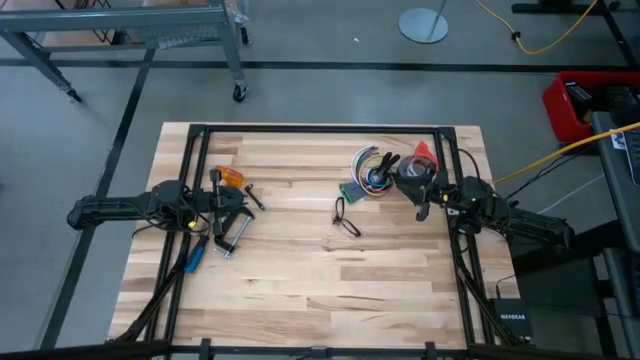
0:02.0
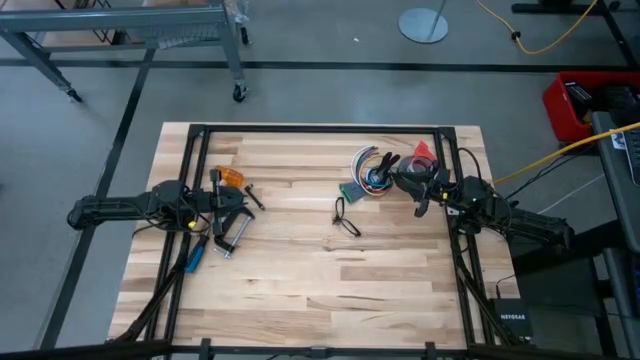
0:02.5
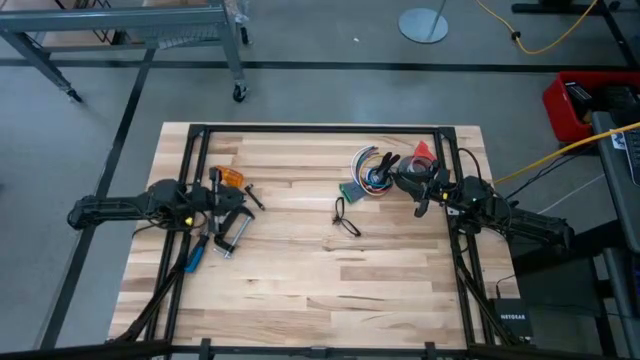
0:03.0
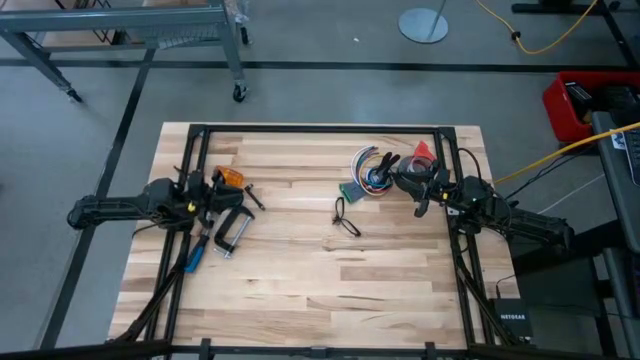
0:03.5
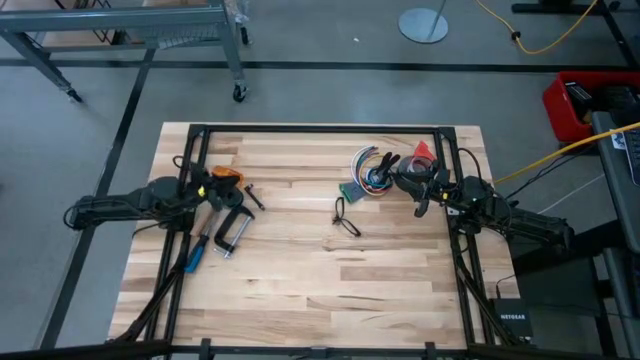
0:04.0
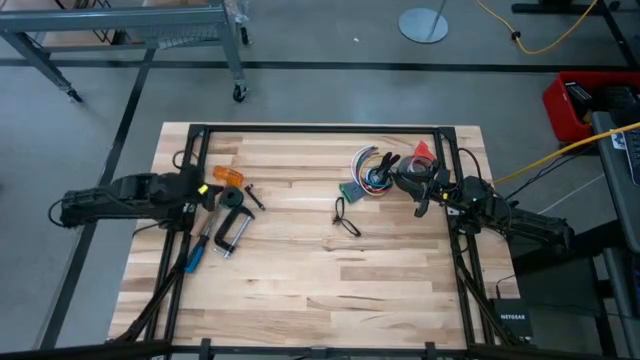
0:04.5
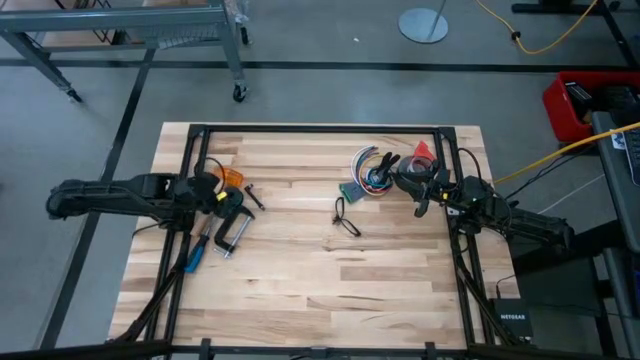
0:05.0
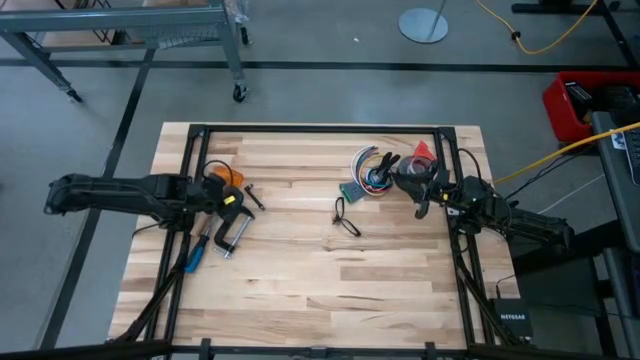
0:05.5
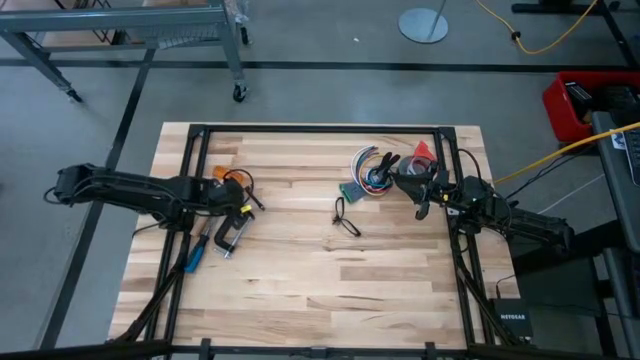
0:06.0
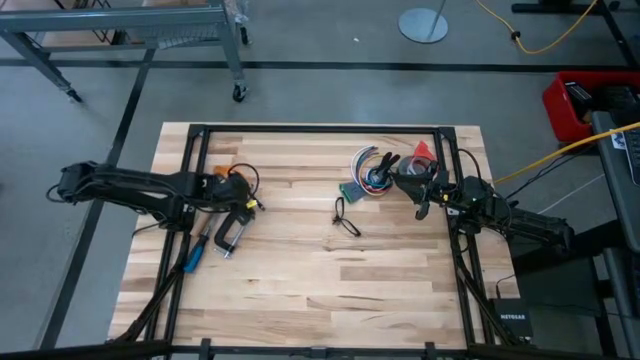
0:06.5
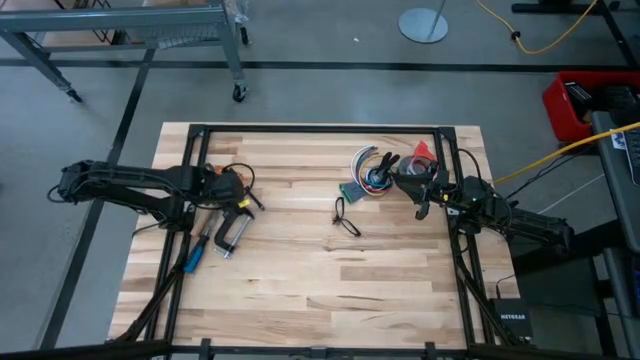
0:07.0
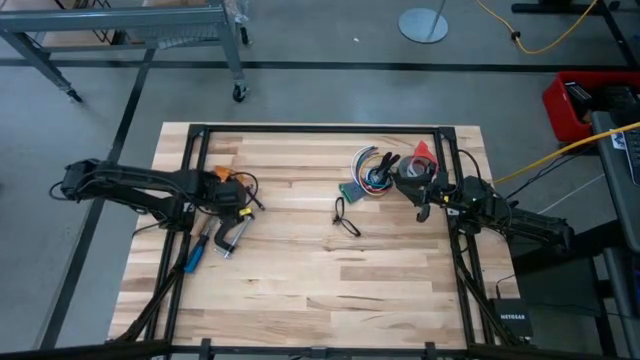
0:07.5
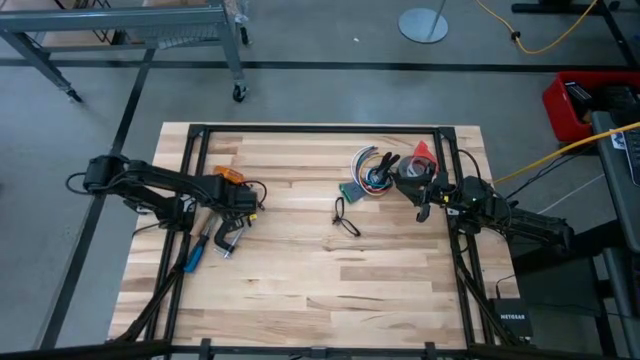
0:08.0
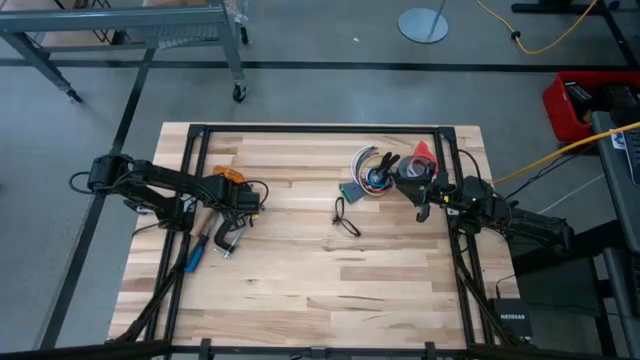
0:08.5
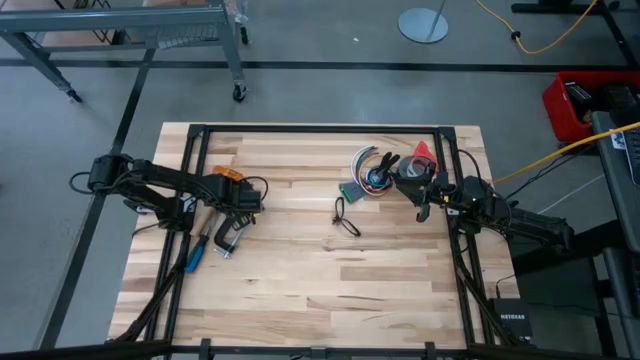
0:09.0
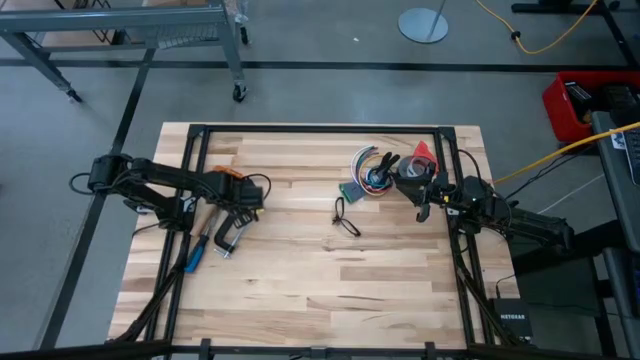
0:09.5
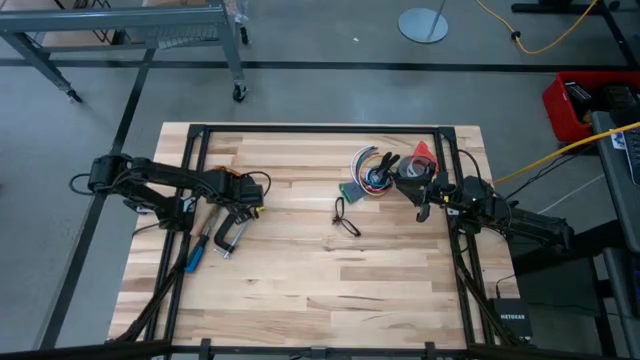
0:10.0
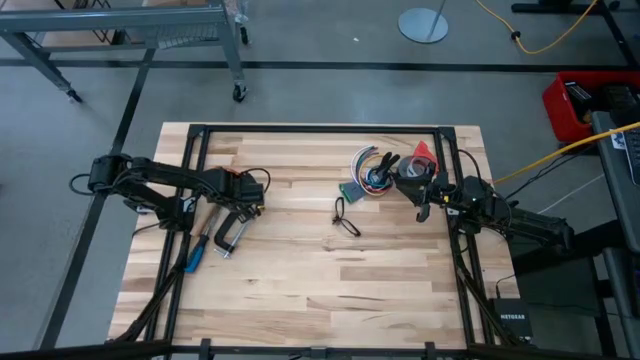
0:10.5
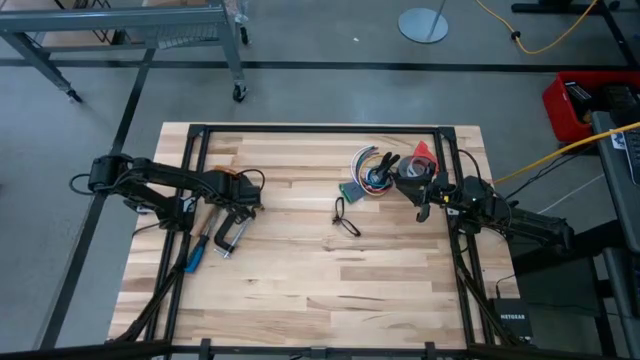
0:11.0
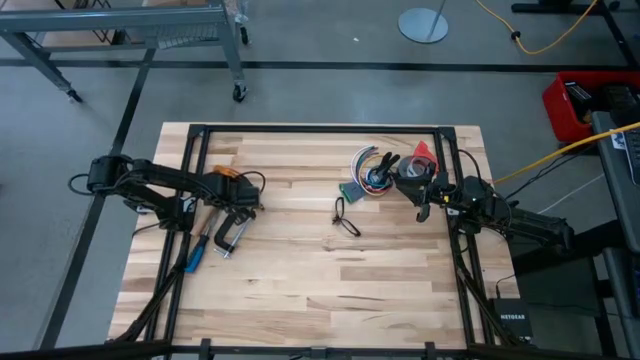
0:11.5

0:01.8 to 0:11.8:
Task: Coil cords
Uncoil the green wire from the black spool

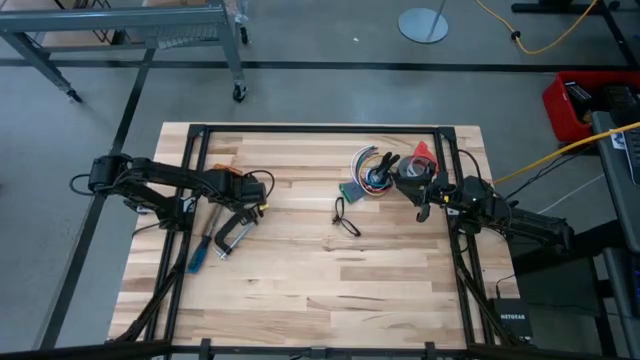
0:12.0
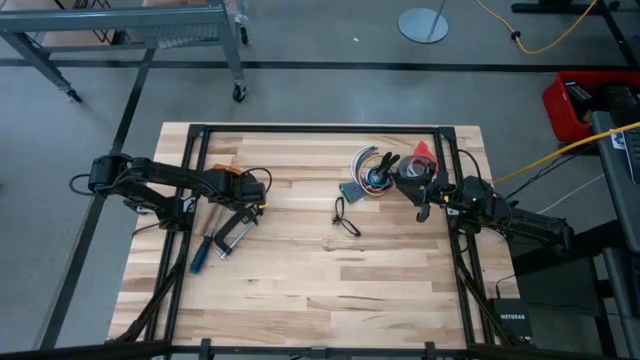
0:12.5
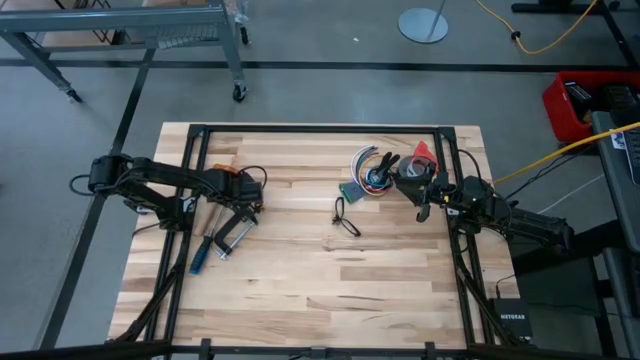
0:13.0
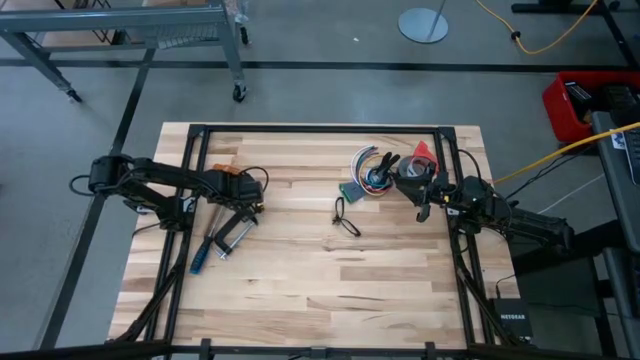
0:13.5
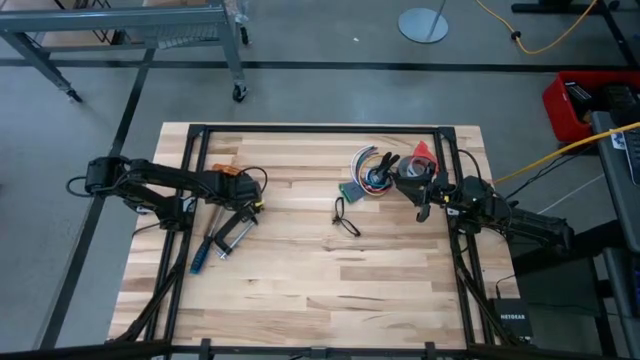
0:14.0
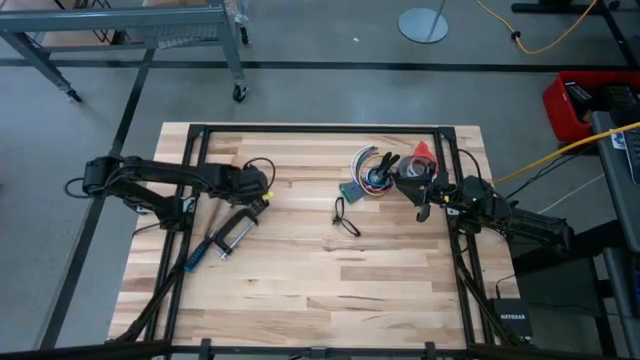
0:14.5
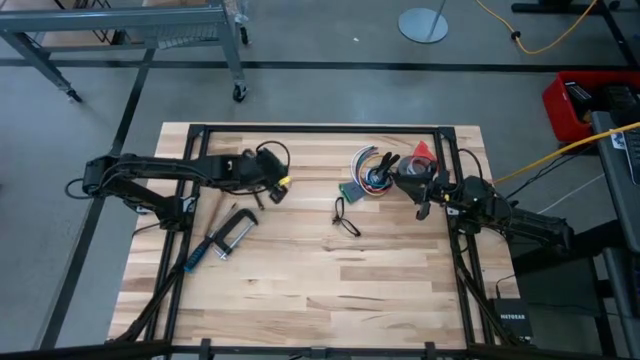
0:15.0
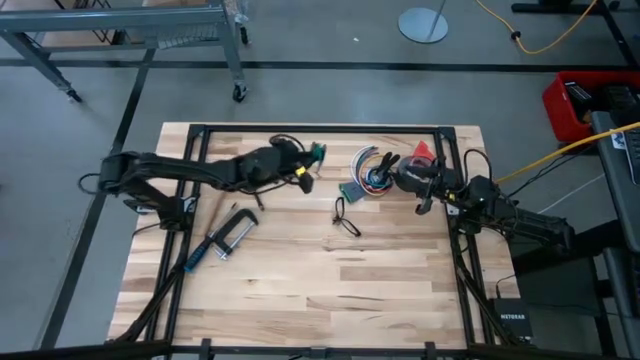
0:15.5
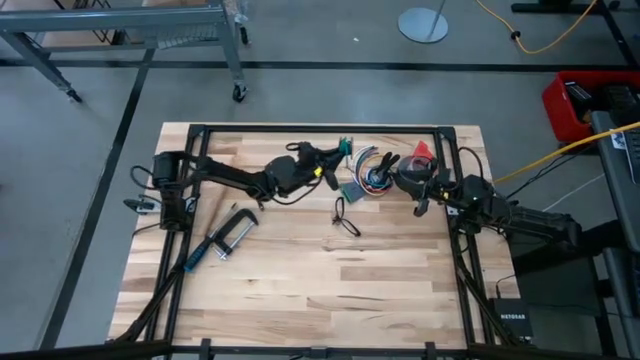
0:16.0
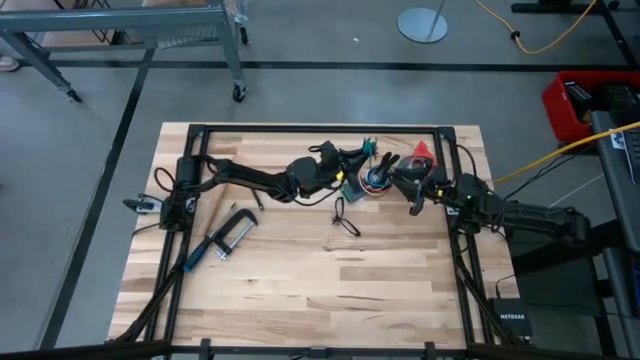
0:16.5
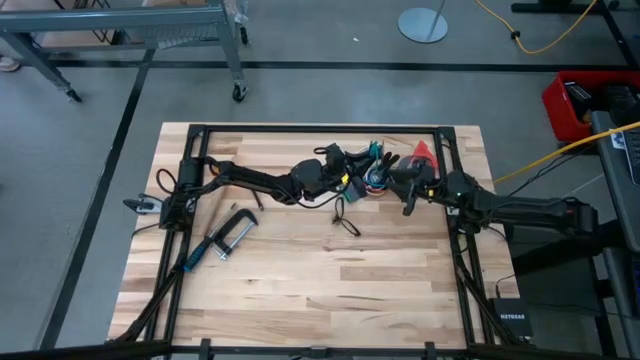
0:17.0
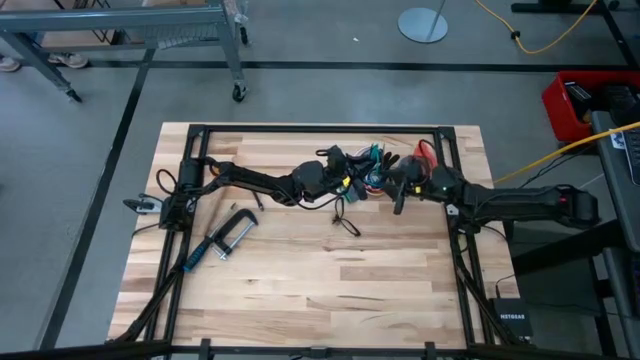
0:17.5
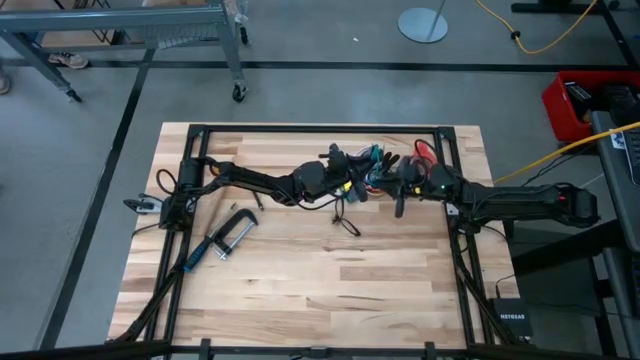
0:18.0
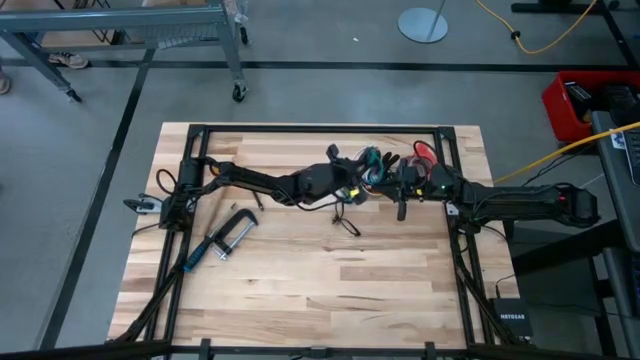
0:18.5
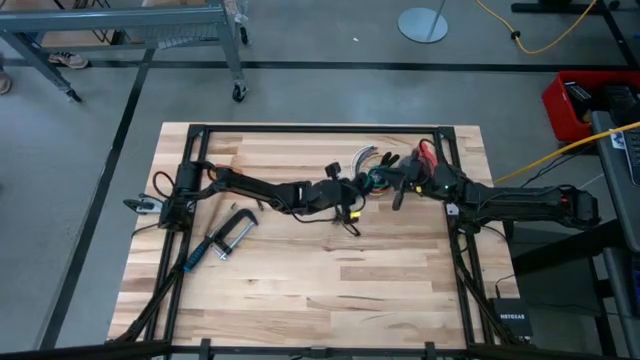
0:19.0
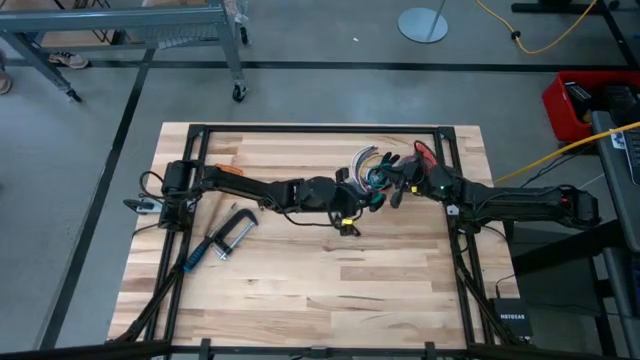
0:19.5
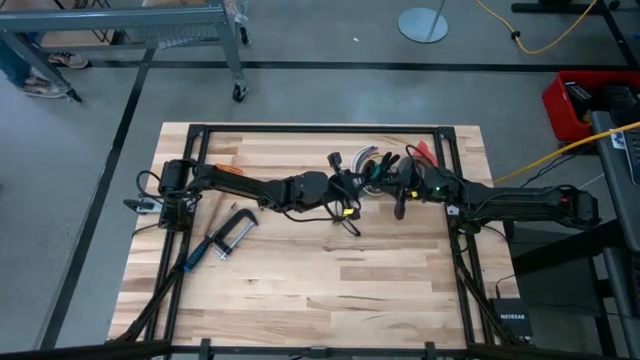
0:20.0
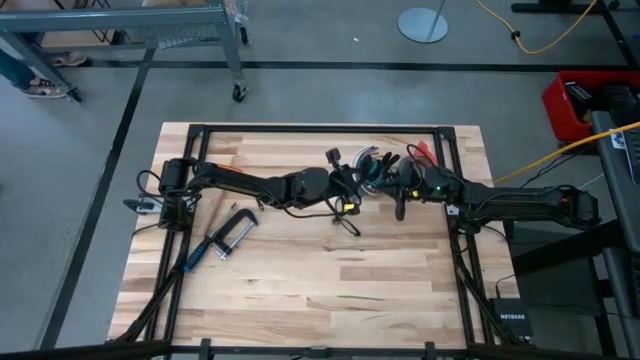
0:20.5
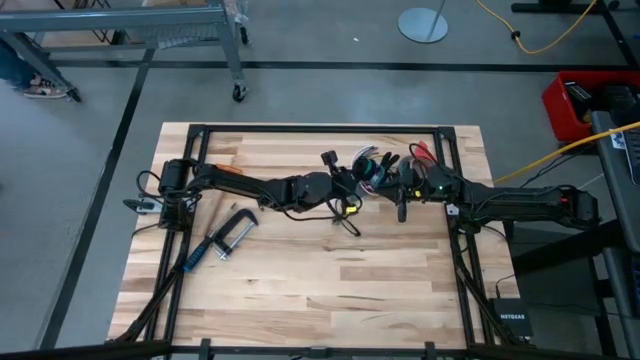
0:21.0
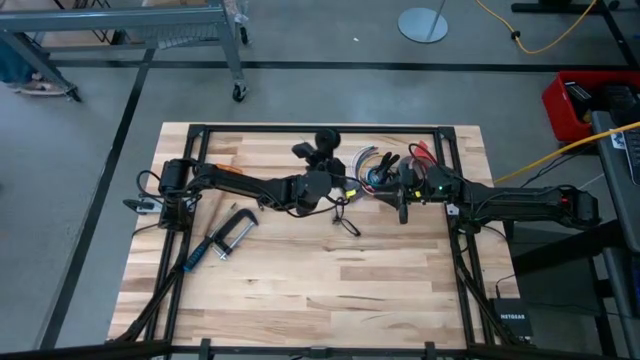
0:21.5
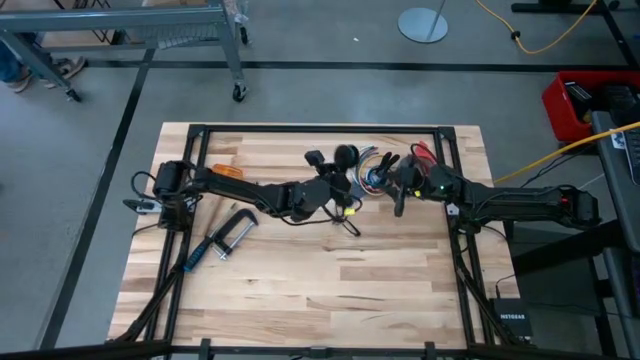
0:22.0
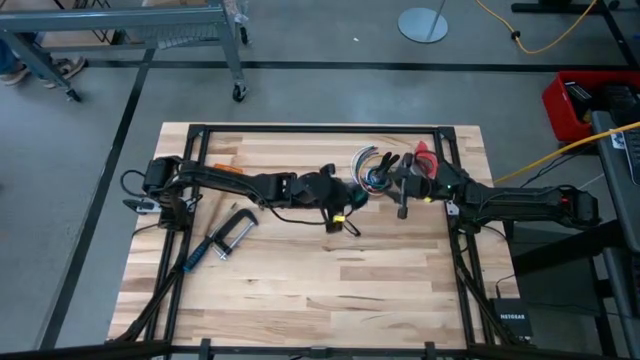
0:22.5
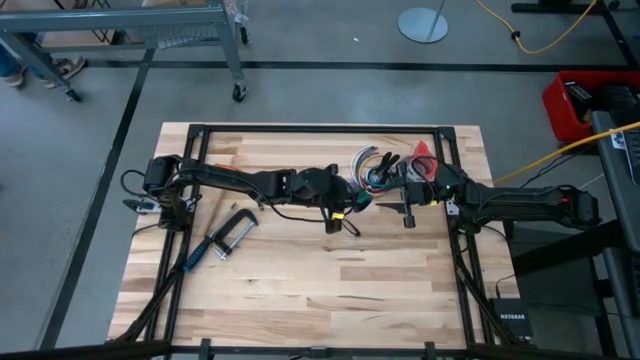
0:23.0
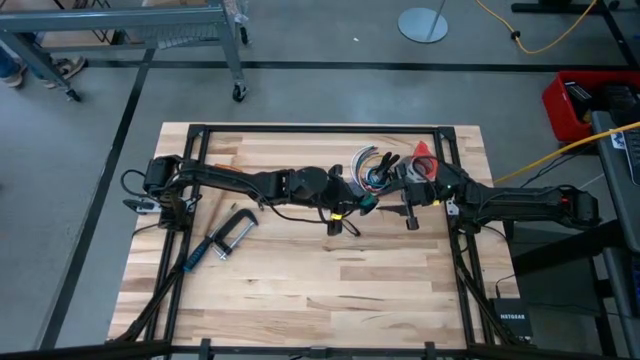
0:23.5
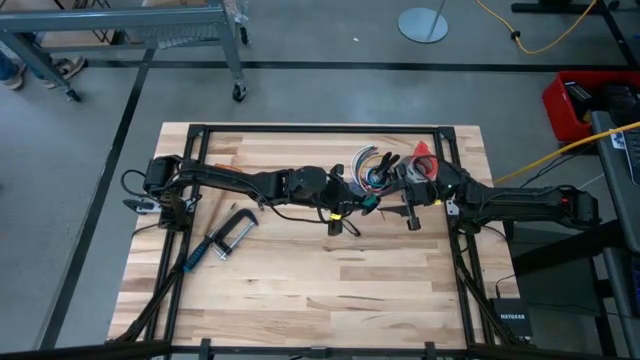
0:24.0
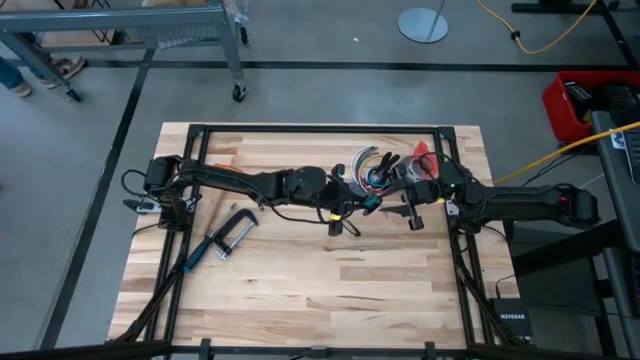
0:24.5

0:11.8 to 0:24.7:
Uncoil the green wire from the black spool
